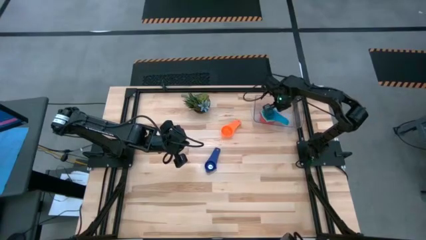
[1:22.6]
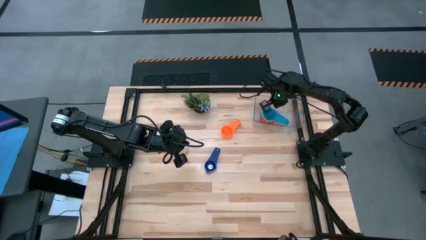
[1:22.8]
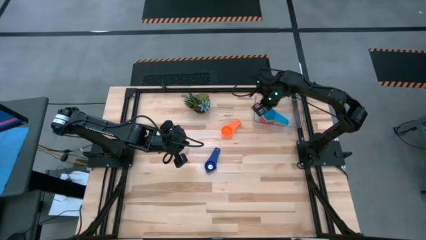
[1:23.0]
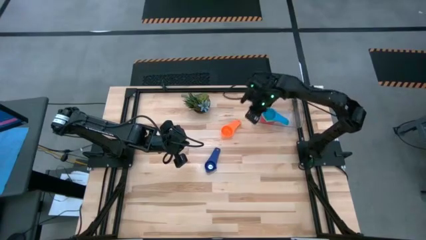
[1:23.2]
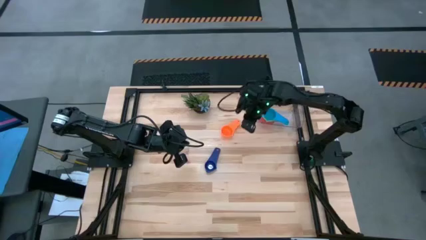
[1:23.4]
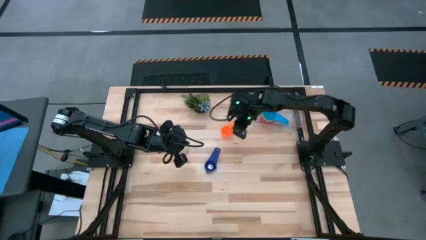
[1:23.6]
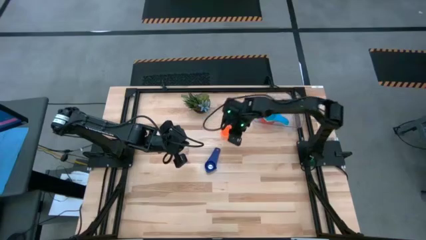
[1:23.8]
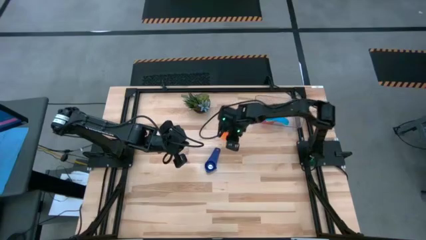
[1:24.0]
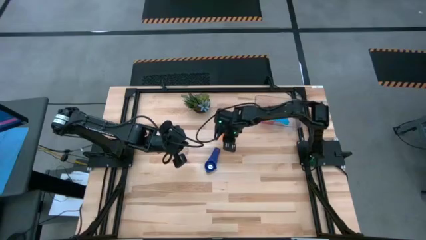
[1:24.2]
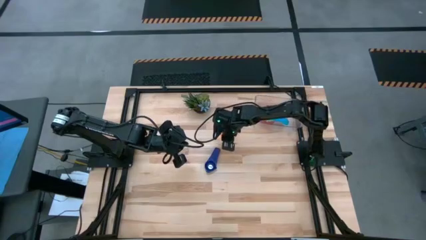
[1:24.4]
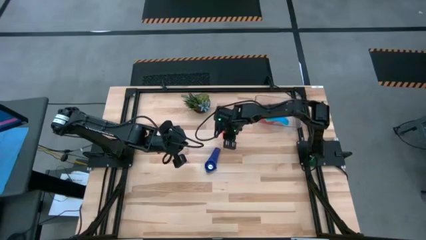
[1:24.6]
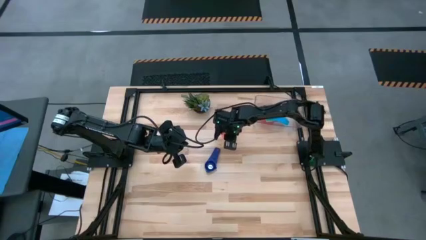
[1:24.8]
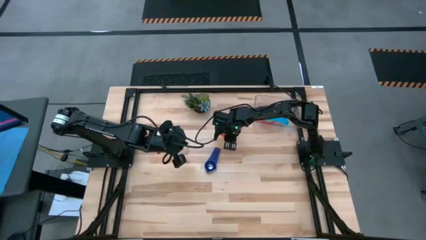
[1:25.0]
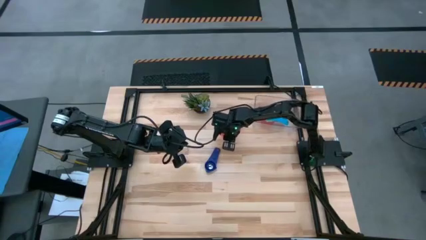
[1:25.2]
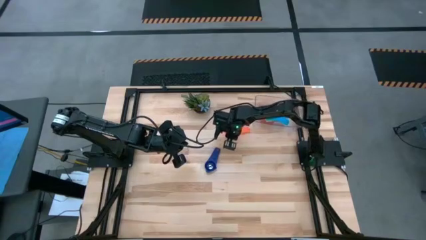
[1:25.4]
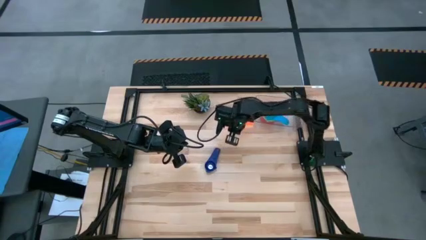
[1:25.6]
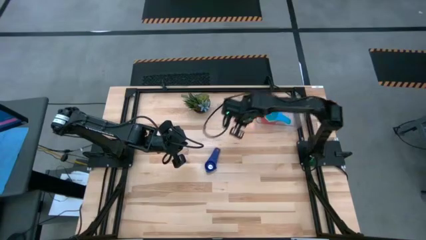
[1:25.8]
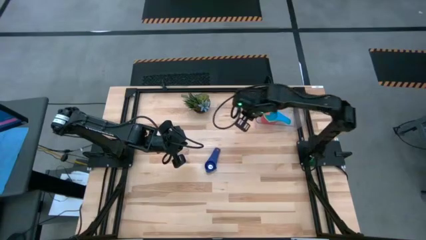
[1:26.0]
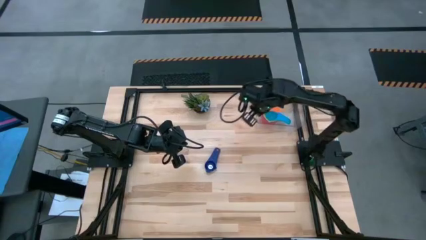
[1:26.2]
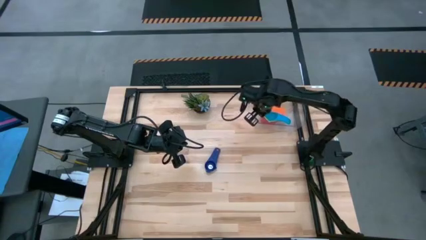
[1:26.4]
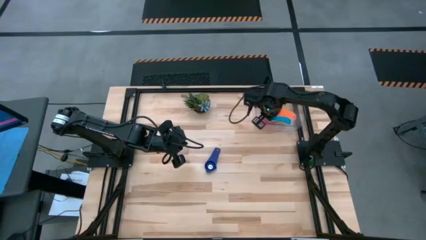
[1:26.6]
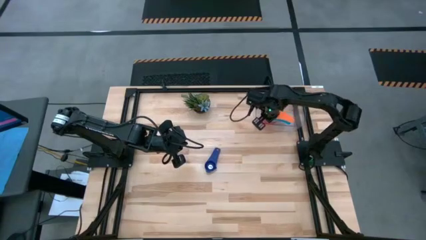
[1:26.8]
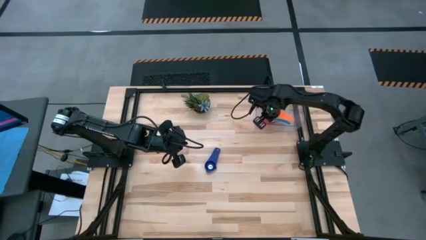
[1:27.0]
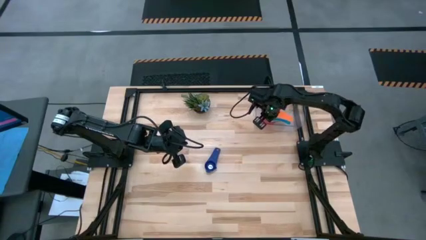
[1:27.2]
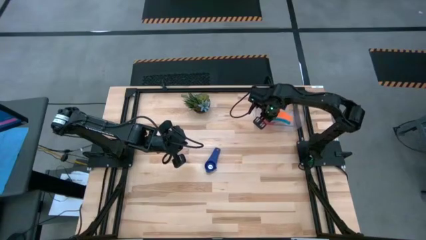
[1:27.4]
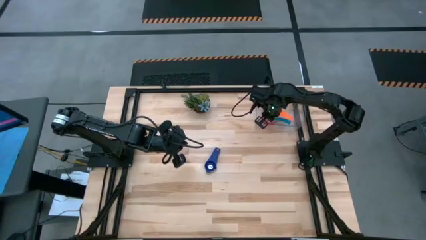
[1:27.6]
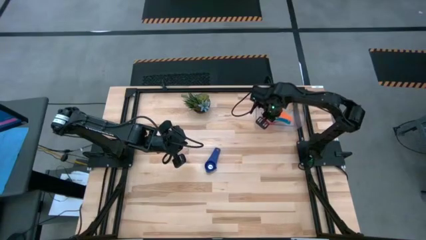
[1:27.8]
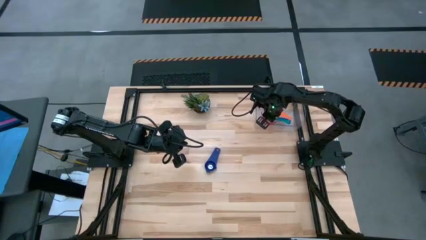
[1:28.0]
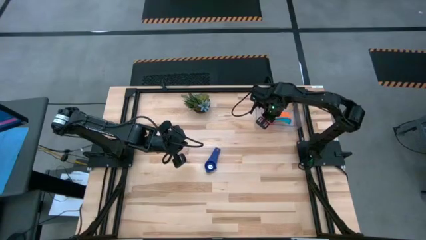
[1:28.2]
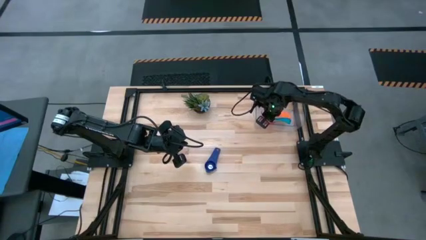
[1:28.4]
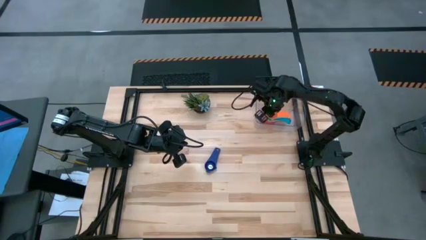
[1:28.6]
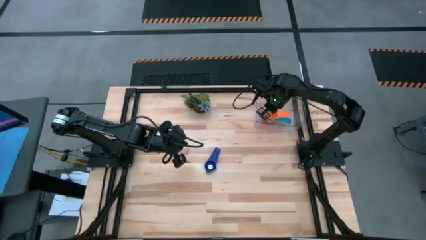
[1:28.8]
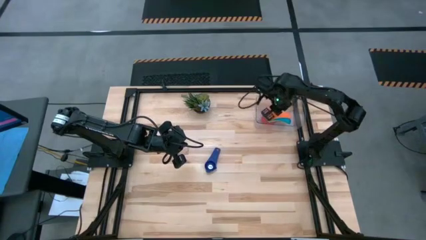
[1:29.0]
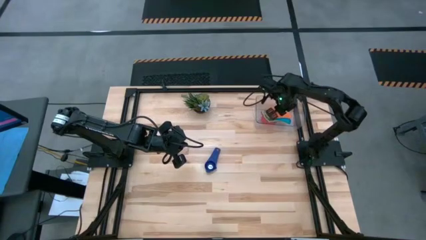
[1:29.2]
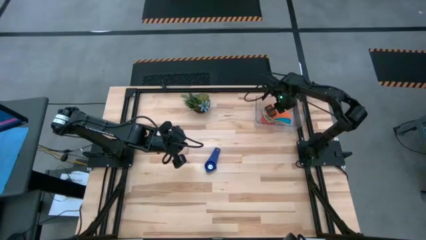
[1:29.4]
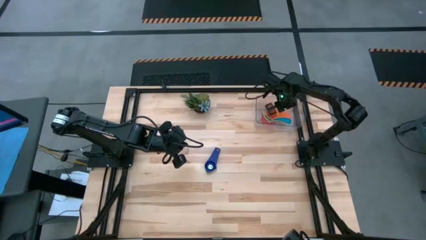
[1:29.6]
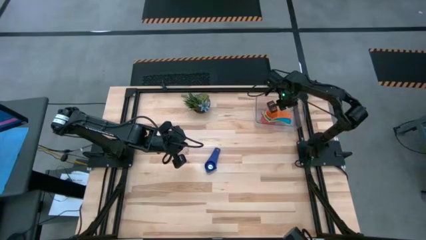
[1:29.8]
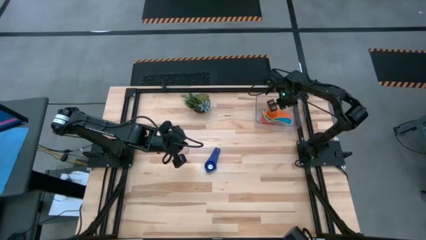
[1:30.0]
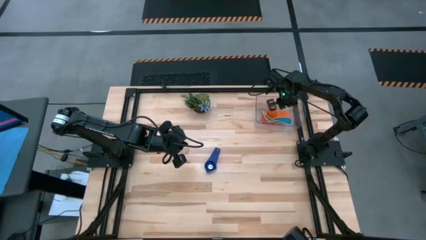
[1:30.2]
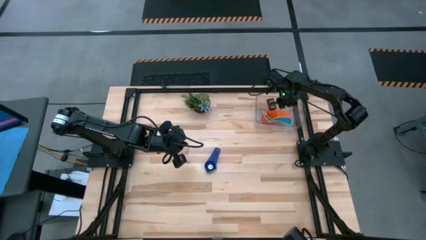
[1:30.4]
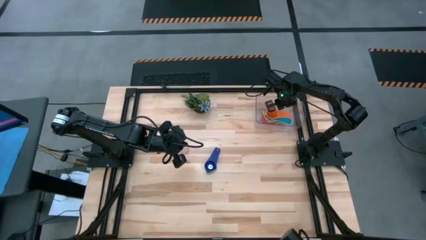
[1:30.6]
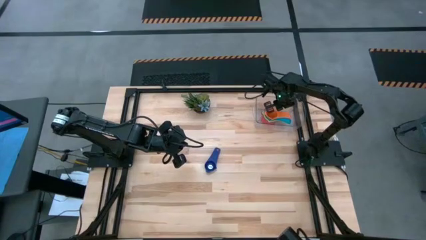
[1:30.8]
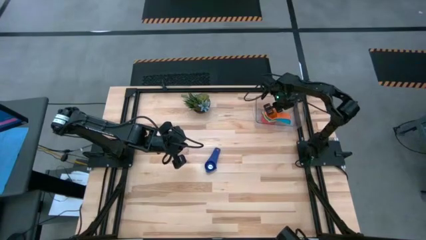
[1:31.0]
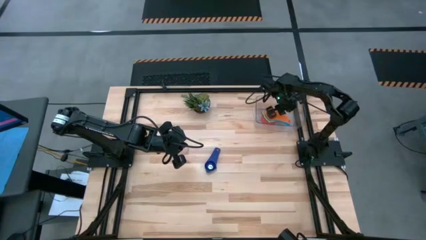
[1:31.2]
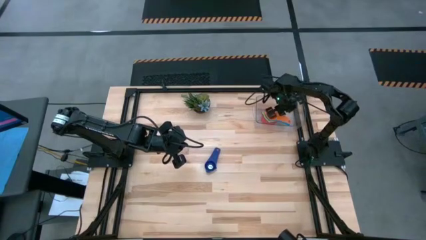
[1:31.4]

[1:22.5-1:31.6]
Task: Nest measuring cups in basket
Stack the orange measuring cup on top of the light blue measuring cup in the transparent bin

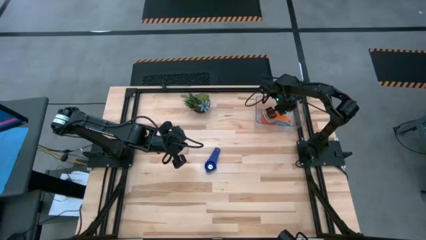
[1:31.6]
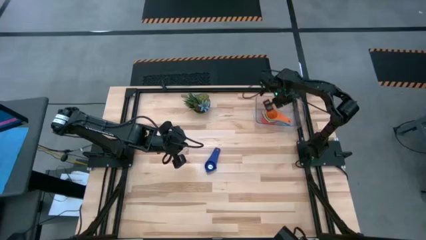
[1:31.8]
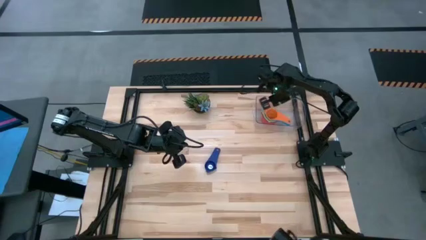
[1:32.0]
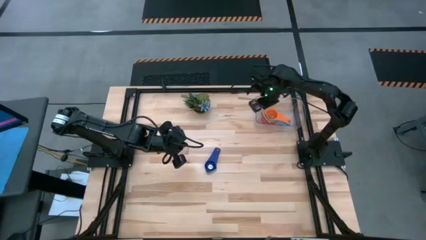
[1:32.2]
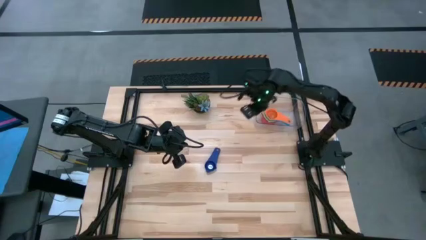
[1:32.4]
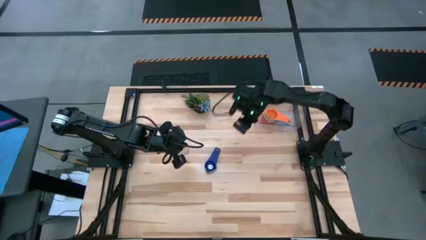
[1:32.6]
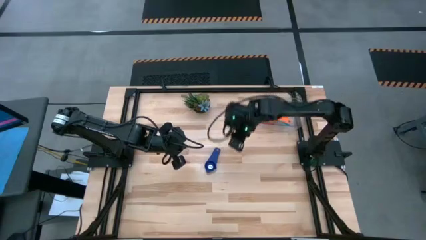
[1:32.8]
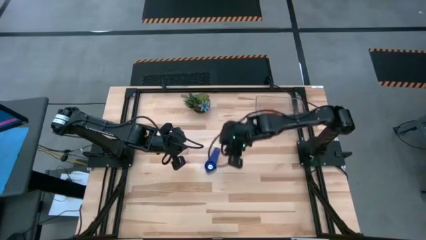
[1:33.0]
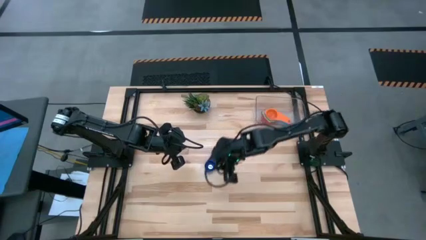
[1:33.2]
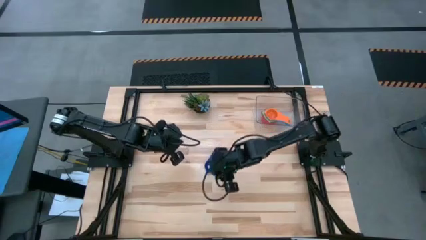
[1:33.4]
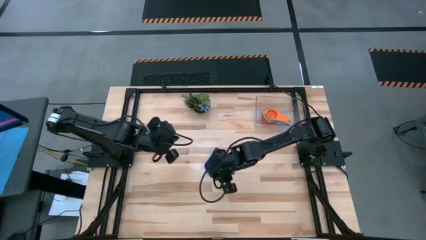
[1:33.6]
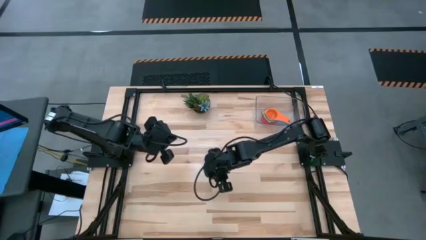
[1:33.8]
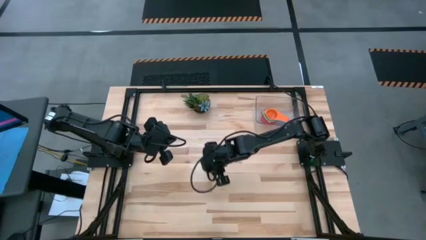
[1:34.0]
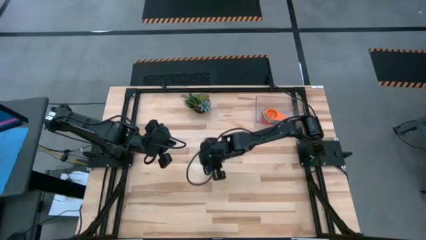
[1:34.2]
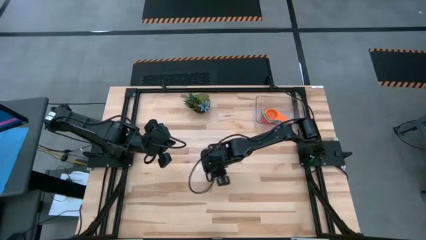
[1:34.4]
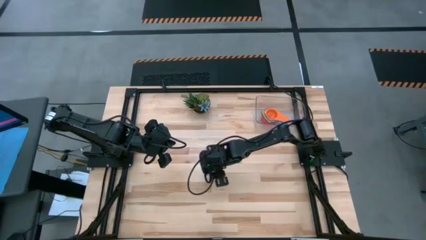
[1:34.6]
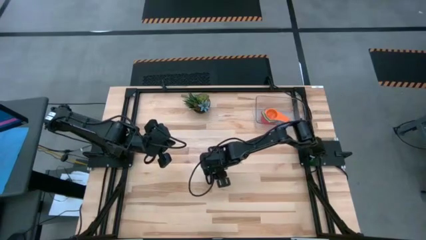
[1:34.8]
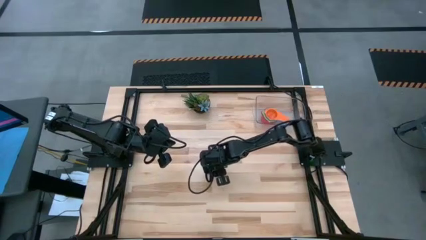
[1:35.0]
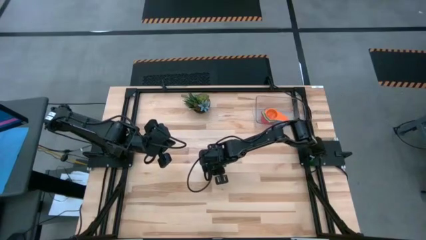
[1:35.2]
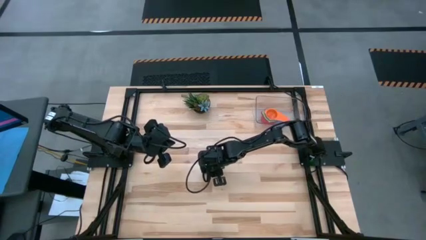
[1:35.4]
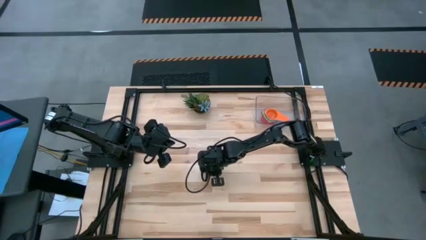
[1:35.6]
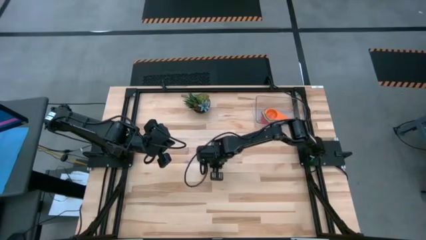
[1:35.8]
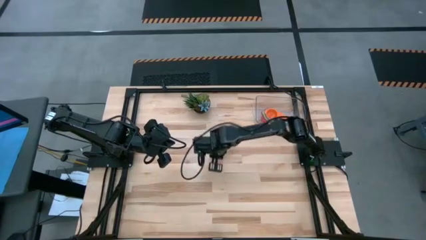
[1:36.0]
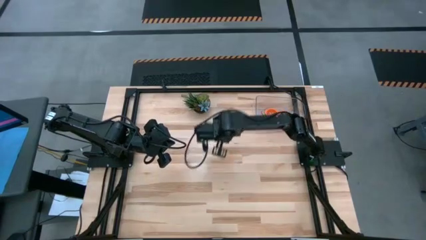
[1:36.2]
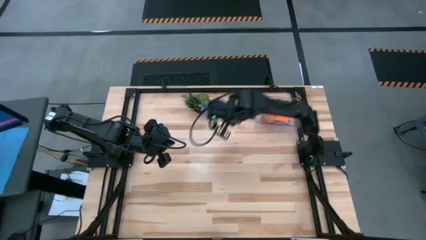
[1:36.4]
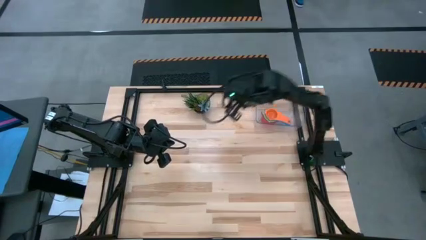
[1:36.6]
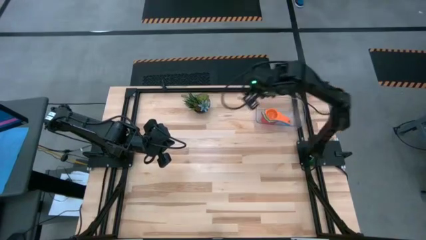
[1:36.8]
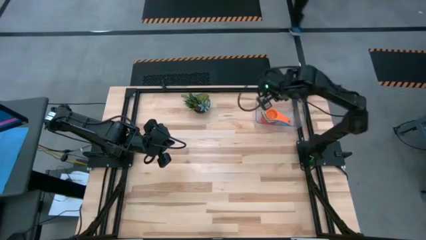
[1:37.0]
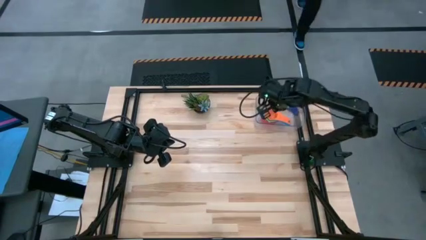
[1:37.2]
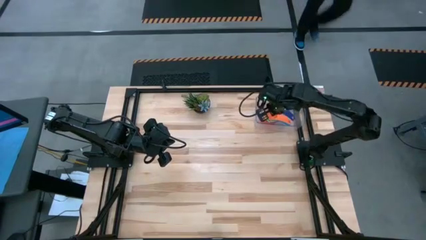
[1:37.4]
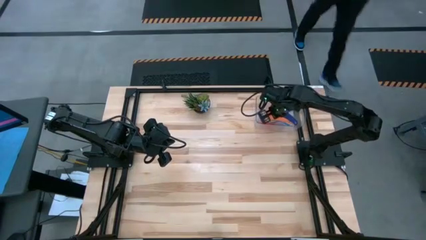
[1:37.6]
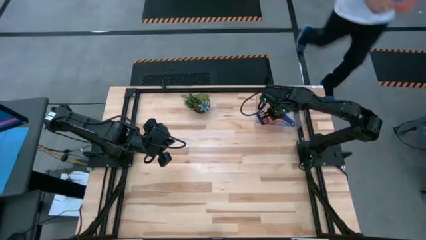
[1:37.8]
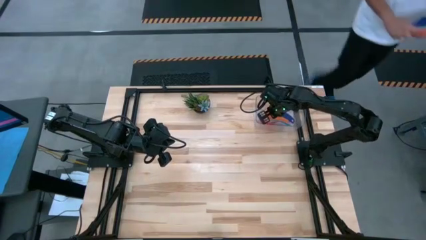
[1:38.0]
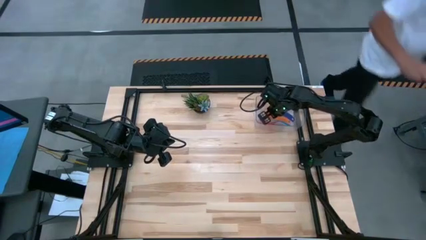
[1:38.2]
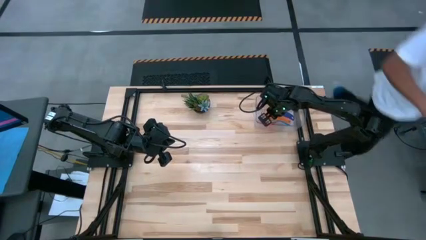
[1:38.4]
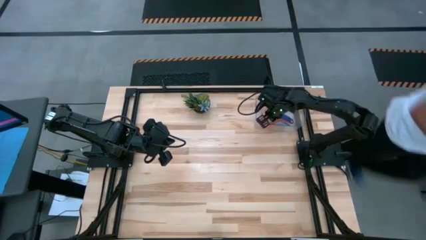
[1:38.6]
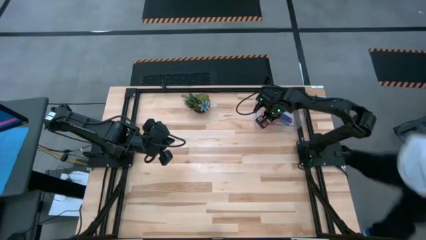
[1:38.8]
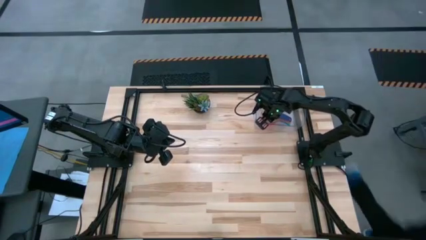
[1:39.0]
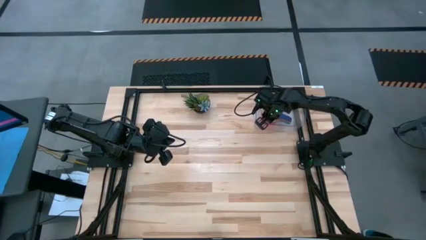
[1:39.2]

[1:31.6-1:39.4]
Stack the dark blue measuring cup into the orange measuring cup in the transparent bin
